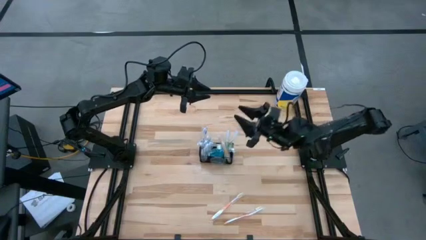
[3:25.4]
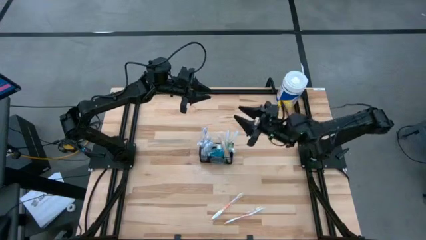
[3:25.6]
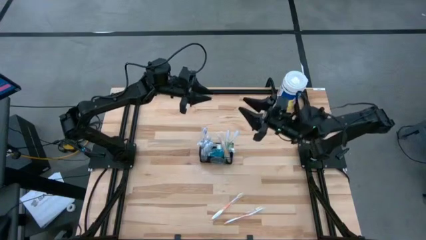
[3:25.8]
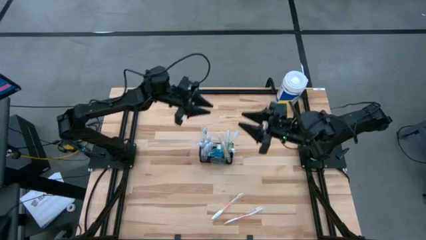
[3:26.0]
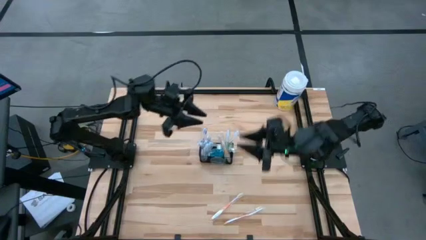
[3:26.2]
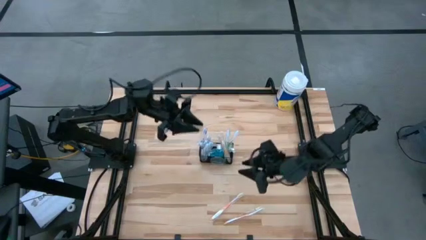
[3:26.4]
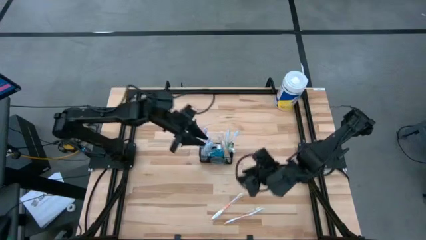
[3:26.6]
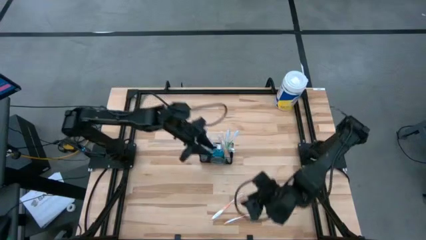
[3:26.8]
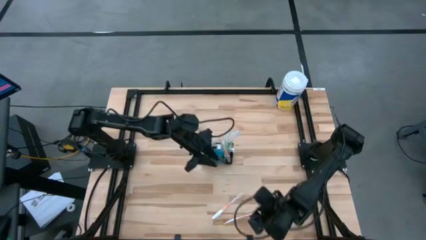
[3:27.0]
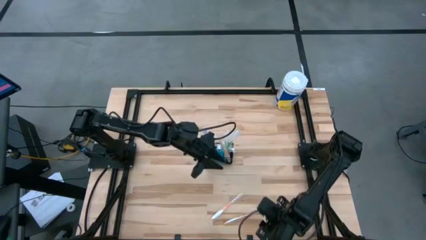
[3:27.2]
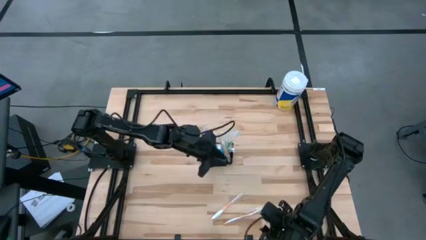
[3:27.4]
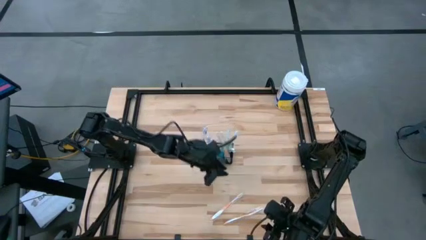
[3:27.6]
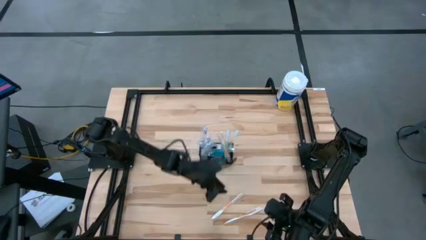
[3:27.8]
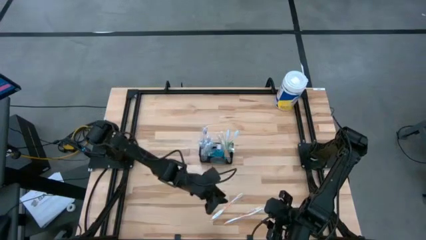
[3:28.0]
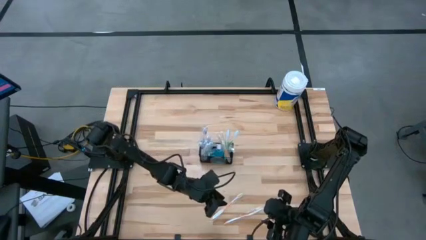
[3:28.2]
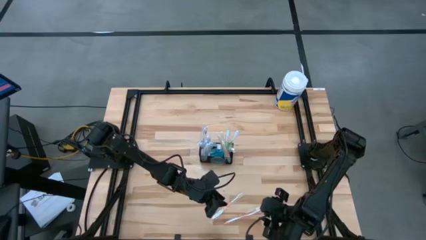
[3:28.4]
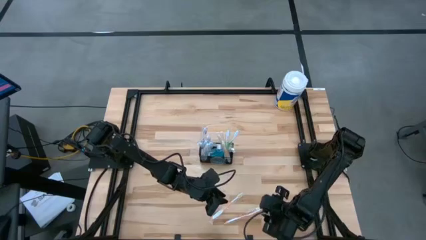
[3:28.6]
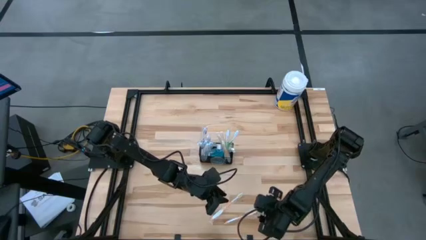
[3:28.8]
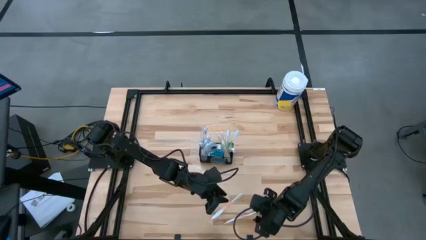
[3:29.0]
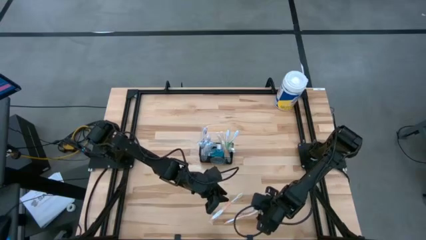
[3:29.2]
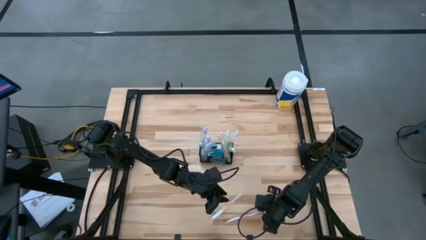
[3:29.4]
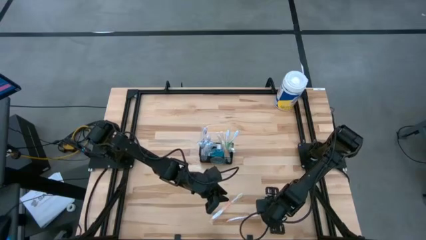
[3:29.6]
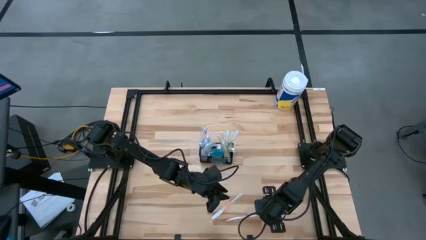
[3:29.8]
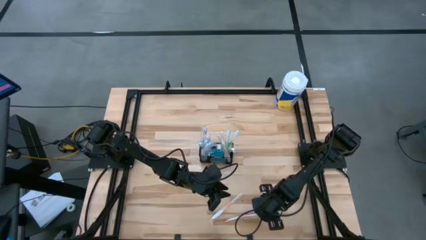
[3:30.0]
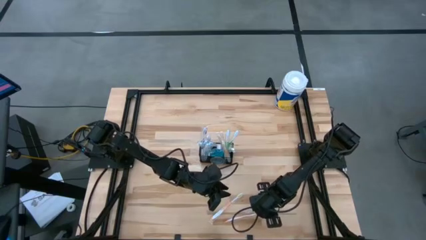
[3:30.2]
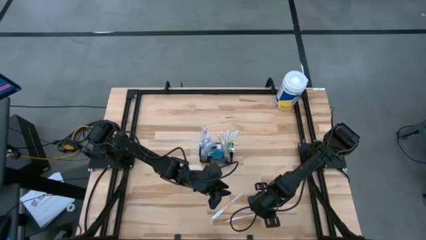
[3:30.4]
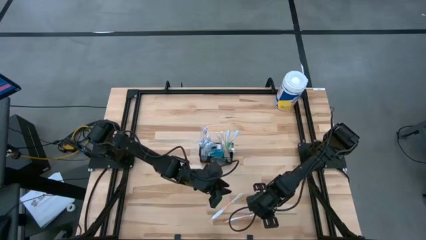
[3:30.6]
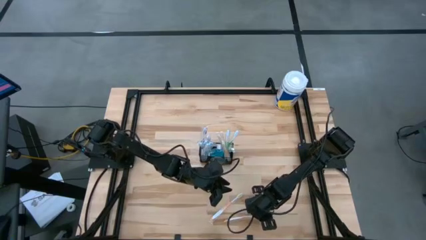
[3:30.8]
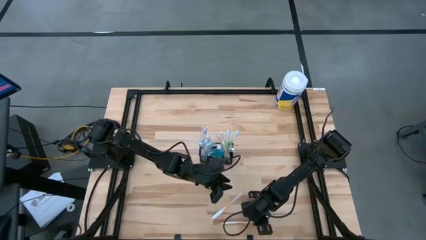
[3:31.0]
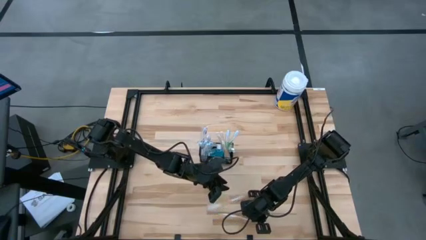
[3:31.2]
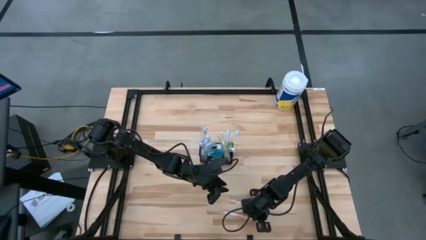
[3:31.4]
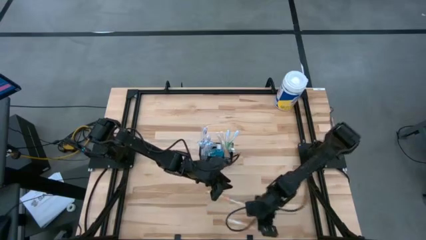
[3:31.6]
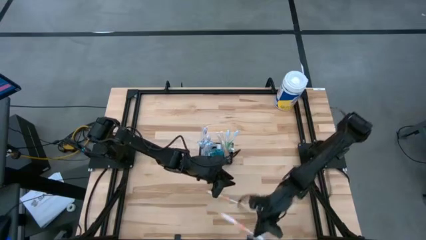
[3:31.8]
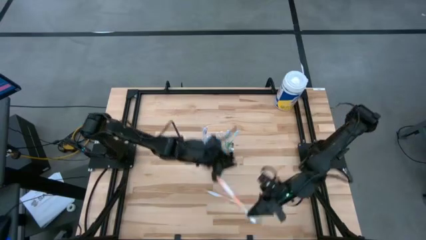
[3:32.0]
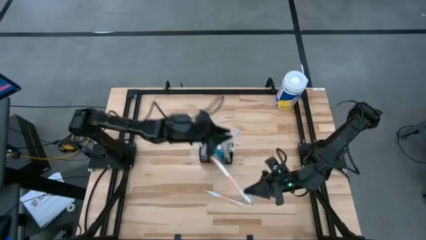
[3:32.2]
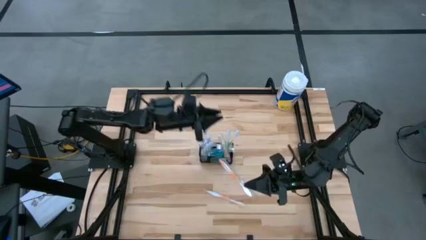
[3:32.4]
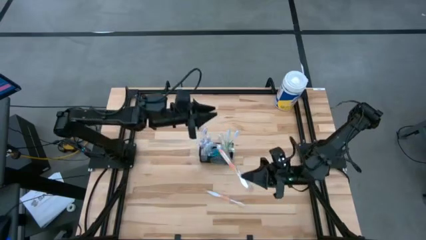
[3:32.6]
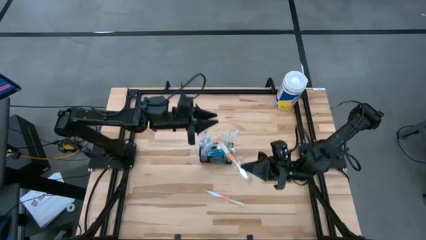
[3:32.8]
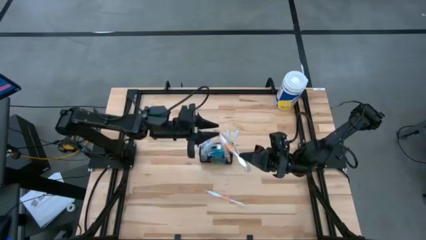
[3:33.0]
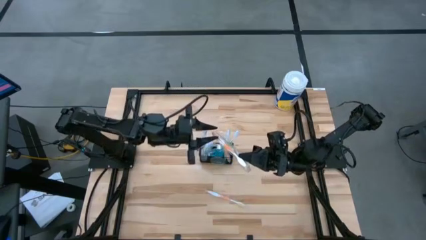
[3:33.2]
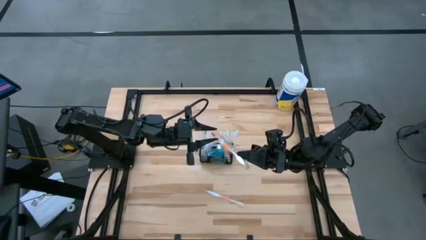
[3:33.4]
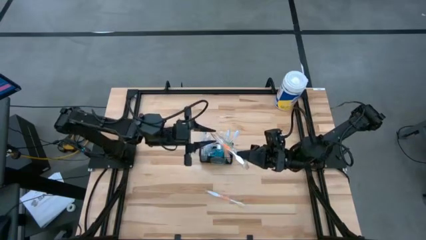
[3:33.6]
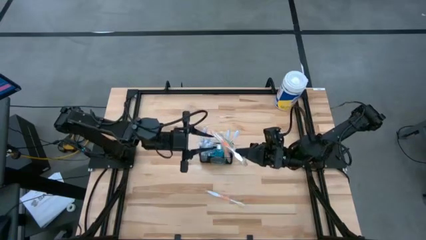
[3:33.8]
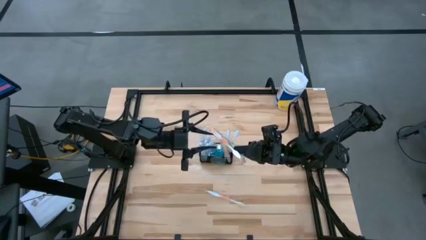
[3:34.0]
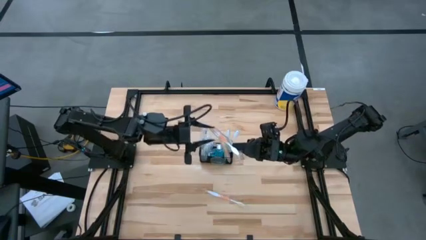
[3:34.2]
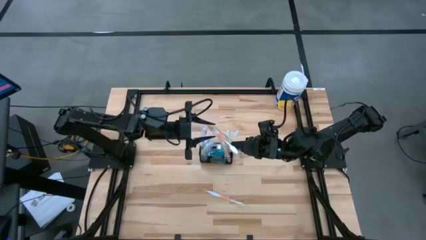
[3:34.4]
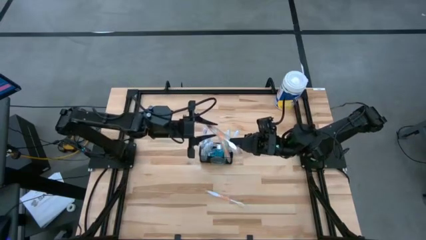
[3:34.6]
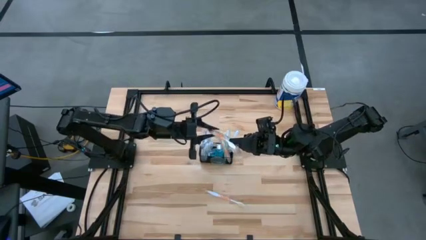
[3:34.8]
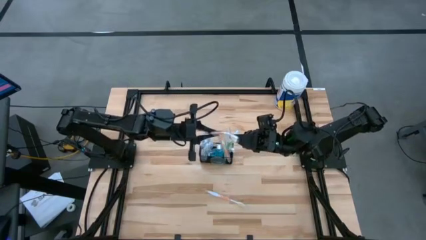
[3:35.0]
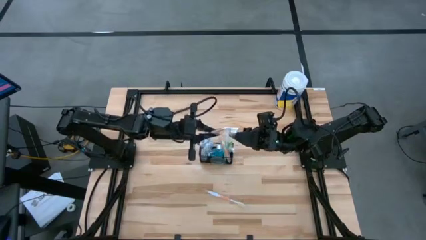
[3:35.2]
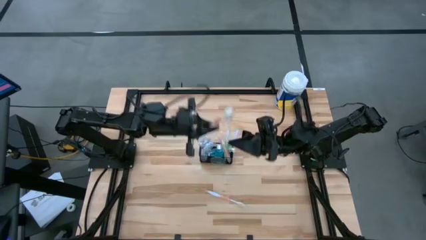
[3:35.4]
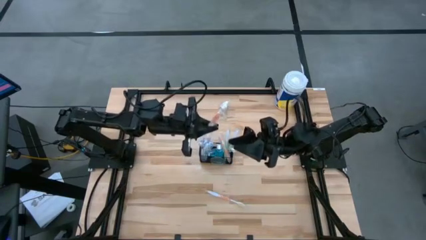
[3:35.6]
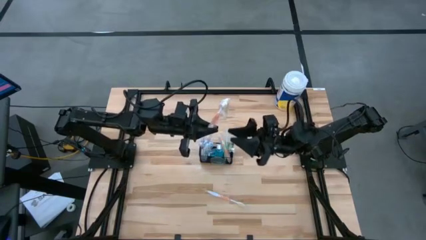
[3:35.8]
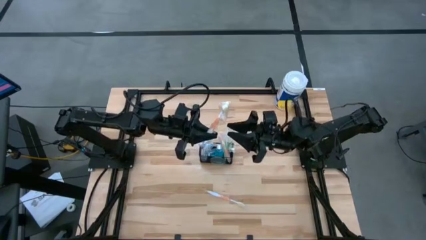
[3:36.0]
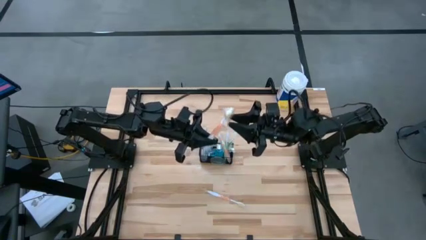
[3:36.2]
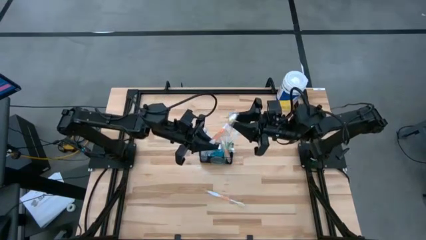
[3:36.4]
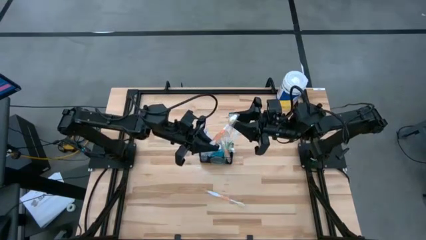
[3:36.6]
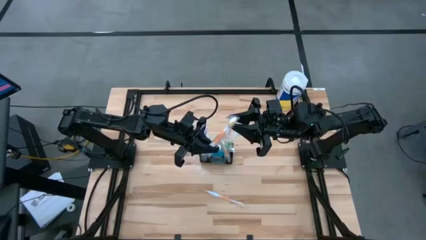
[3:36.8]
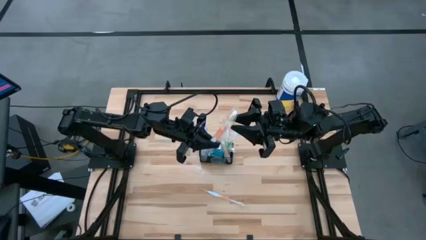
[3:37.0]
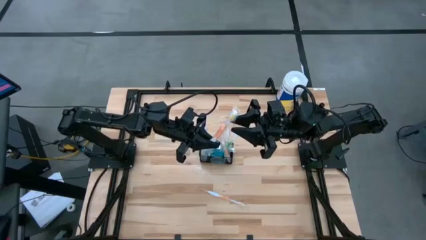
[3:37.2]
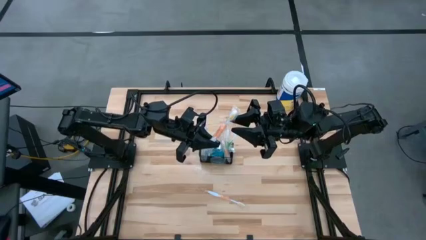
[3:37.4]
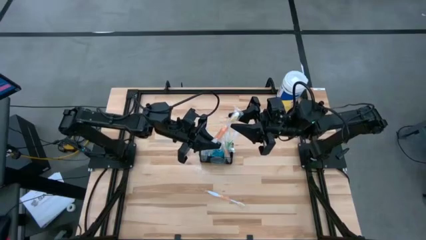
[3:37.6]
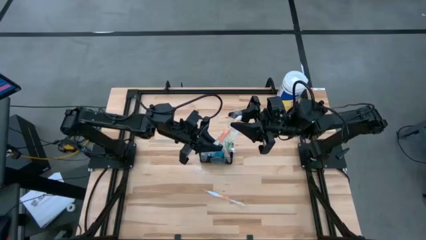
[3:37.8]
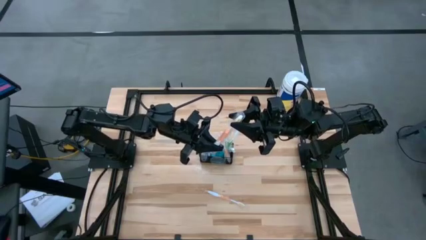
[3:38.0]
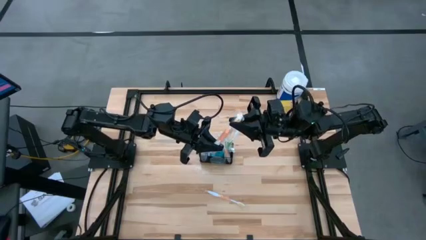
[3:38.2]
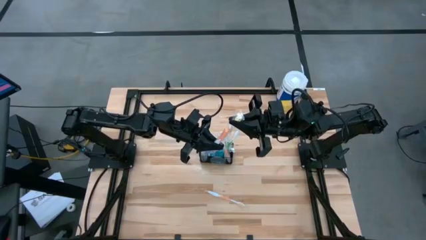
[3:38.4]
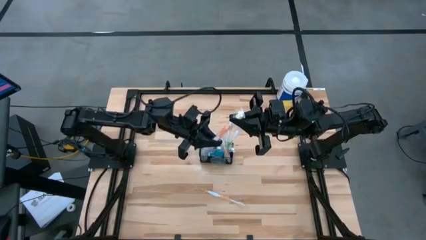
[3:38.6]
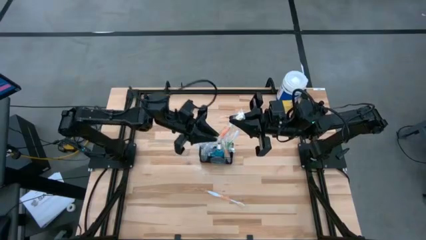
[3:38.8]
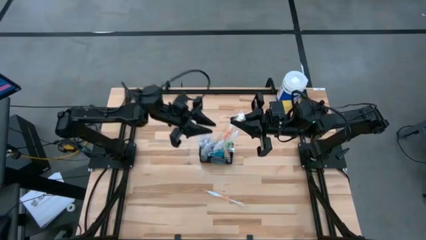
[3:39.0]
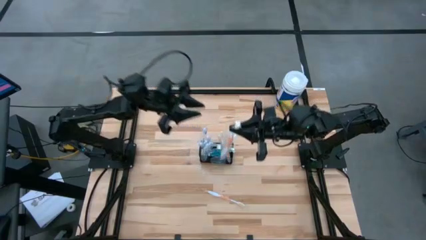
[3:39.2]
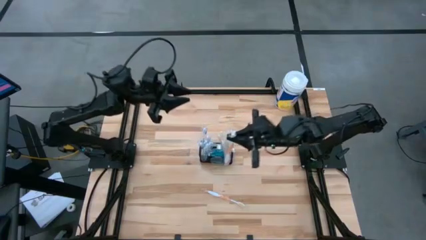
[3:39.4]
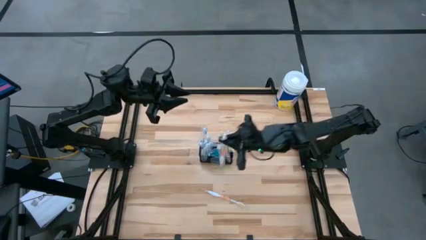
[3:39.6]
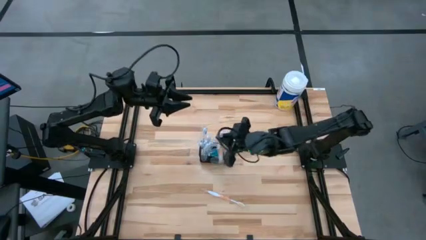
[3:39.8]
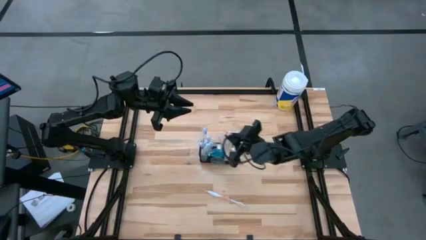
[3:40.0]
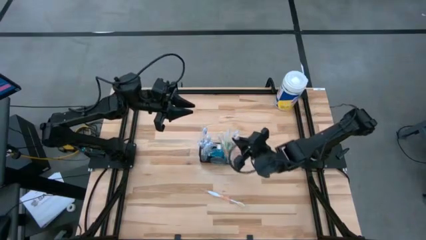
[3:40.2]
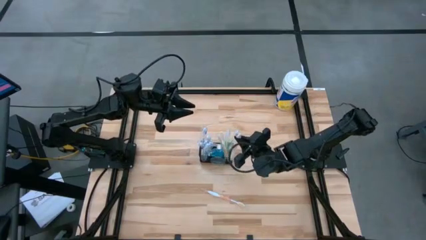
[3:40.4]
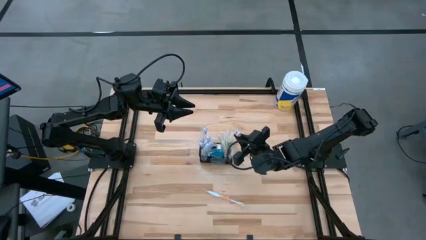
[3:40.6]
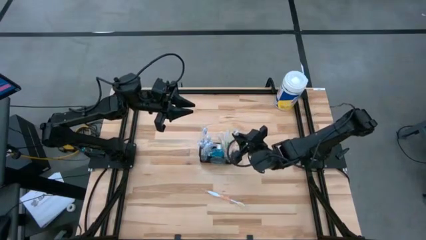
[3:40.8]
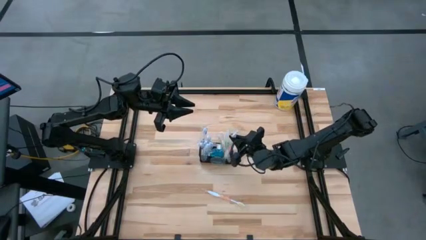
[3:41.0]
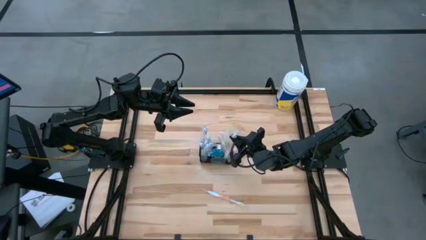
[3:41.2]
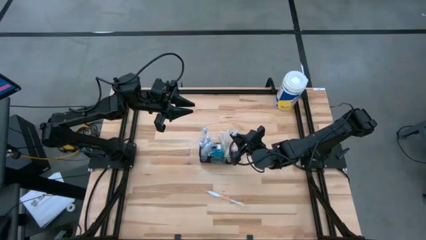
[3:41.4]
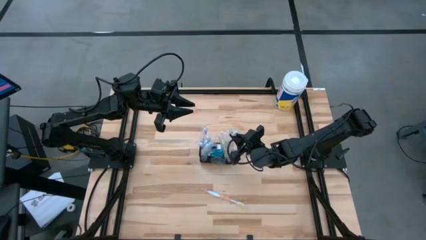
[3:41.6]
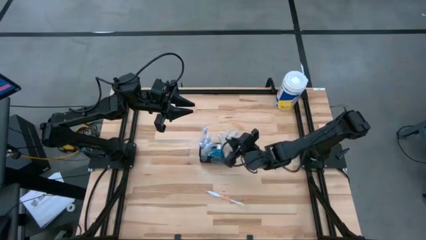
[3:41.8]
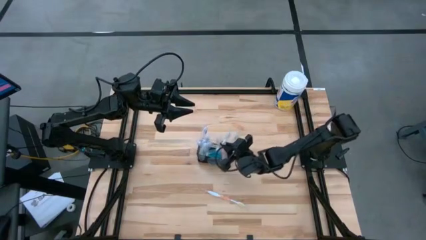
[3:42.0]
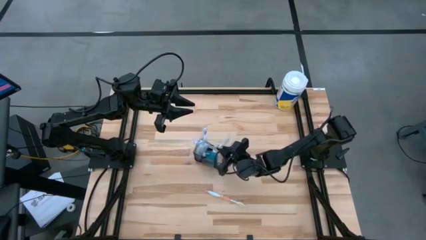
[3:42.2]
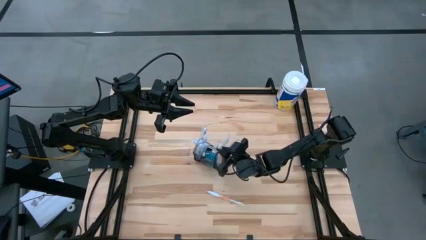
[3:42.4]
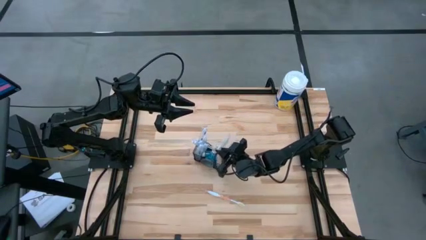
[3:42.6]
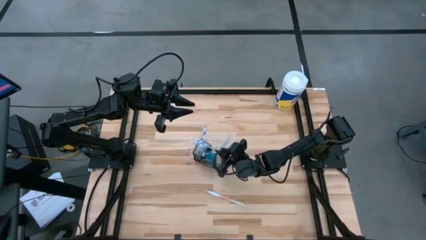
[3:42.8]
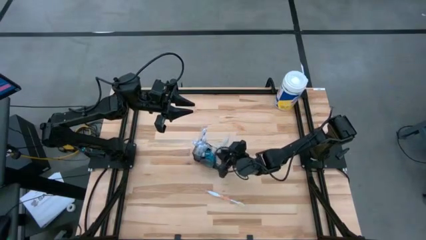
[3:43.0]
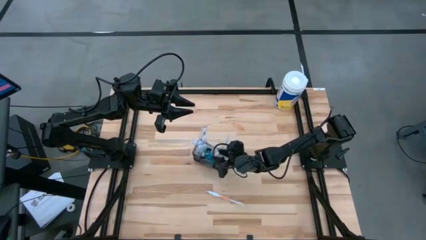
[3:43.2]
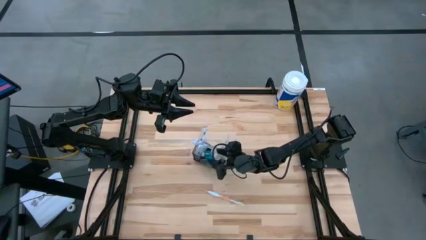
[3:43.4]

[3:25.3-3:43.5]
Task: Pick & Place toothbrushing station
Put the orange toothbrush into the black wire organizer
